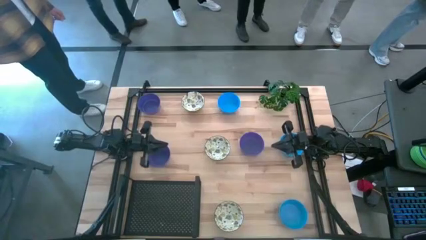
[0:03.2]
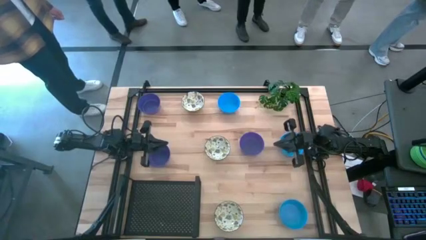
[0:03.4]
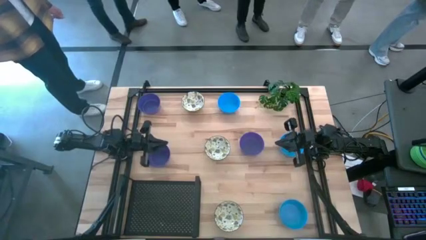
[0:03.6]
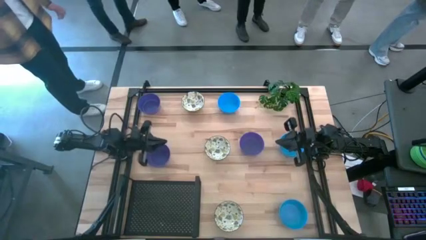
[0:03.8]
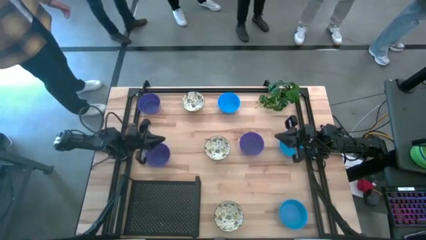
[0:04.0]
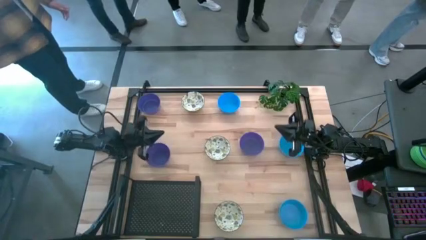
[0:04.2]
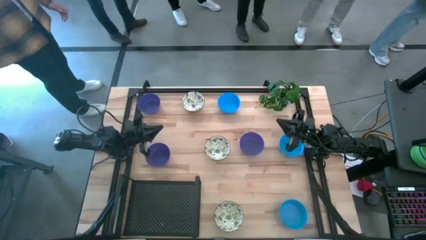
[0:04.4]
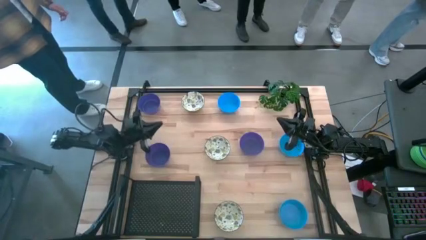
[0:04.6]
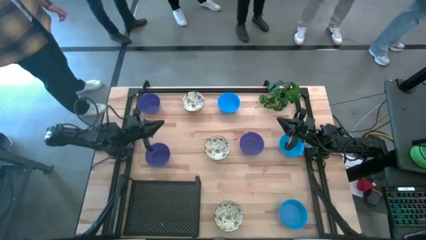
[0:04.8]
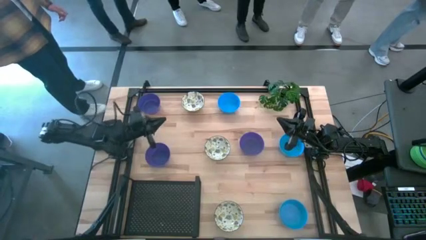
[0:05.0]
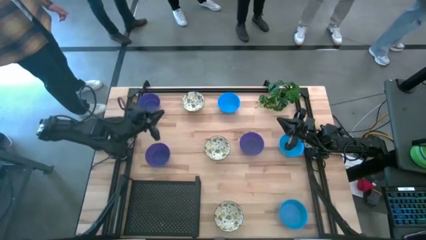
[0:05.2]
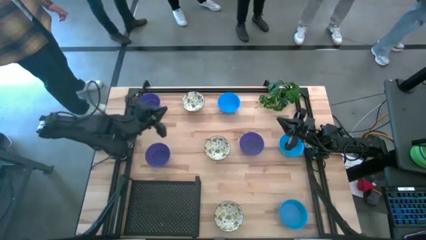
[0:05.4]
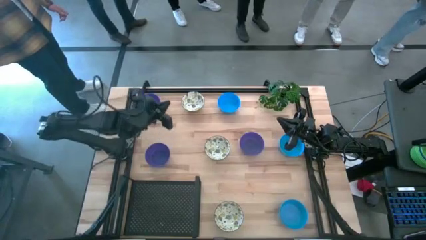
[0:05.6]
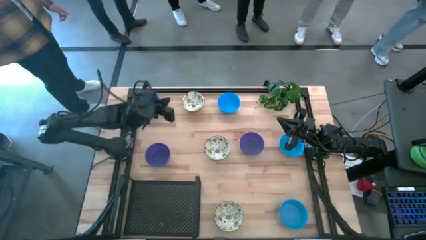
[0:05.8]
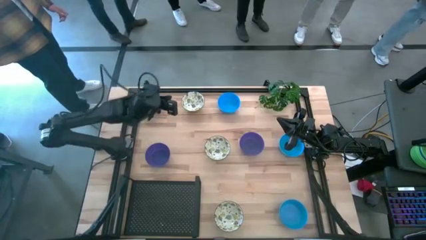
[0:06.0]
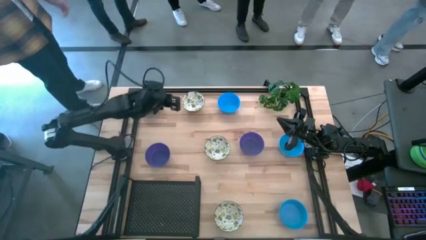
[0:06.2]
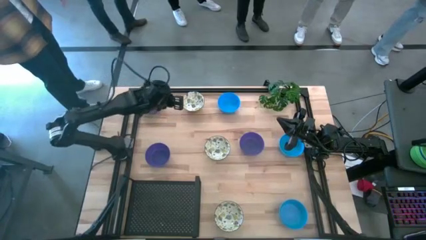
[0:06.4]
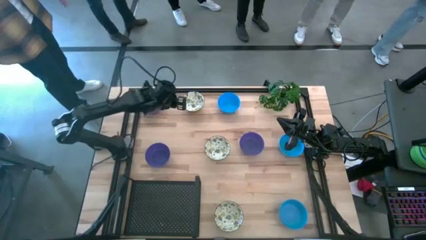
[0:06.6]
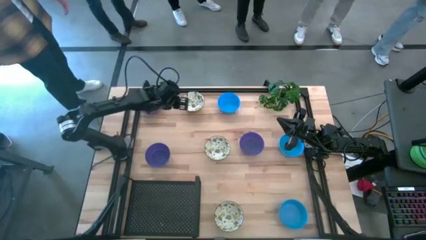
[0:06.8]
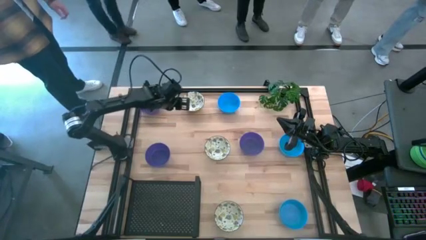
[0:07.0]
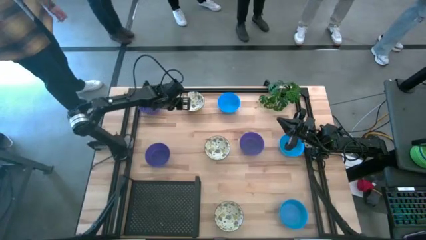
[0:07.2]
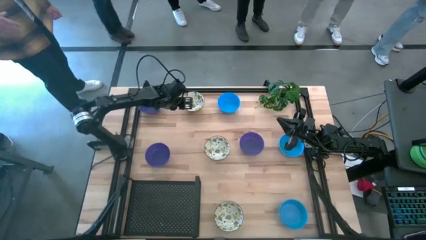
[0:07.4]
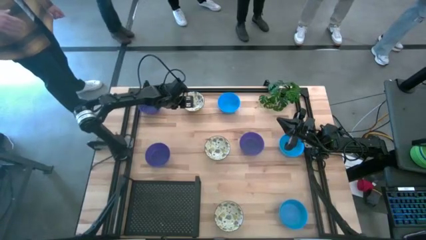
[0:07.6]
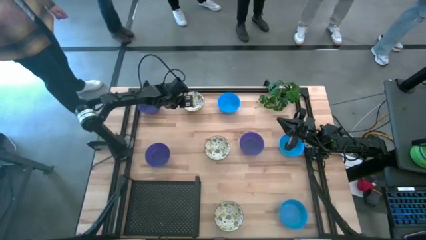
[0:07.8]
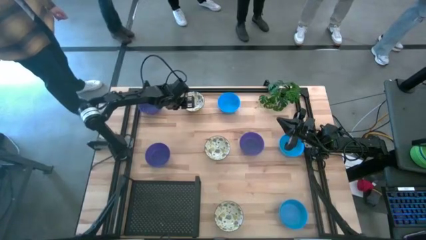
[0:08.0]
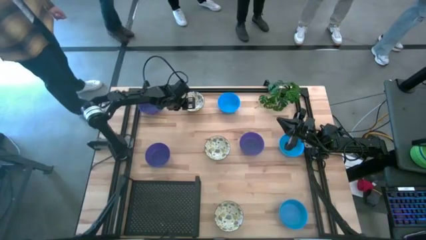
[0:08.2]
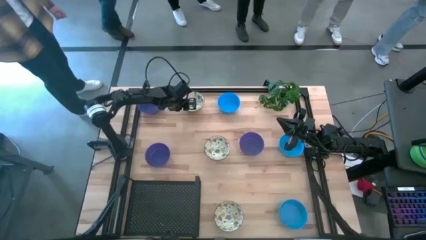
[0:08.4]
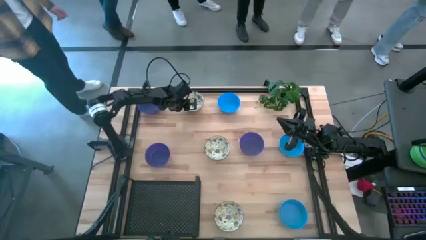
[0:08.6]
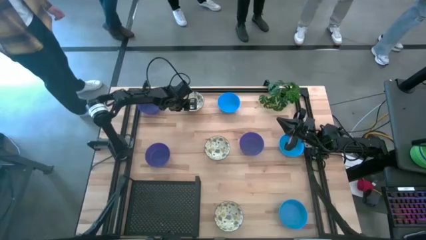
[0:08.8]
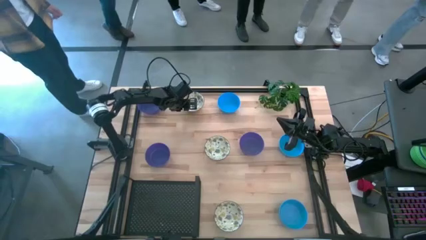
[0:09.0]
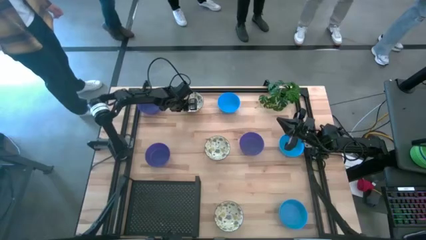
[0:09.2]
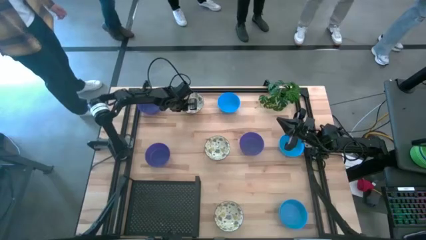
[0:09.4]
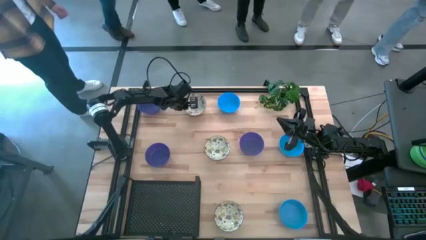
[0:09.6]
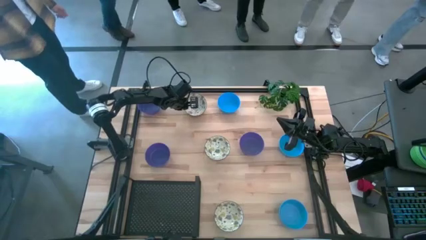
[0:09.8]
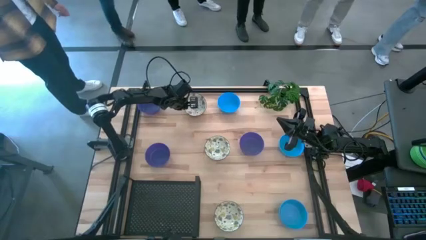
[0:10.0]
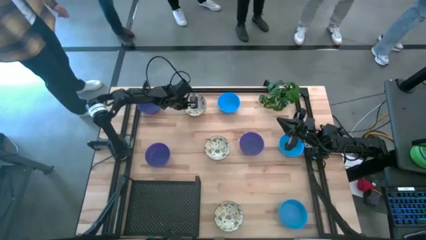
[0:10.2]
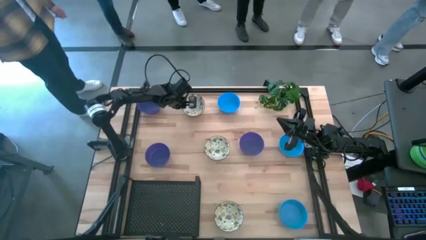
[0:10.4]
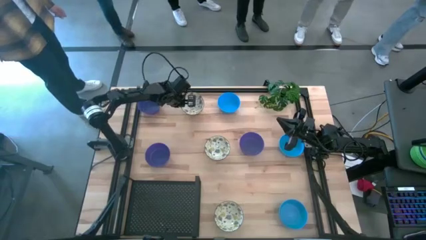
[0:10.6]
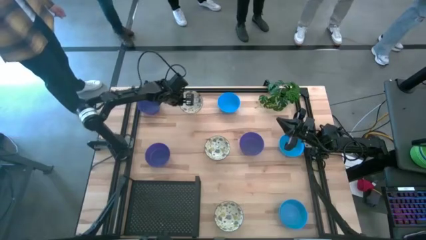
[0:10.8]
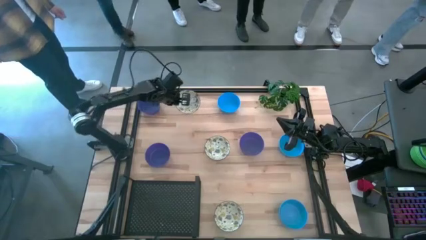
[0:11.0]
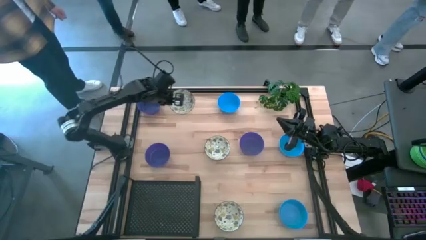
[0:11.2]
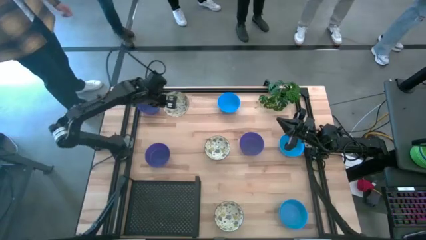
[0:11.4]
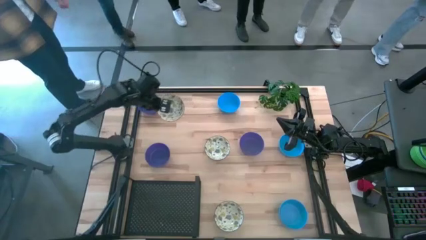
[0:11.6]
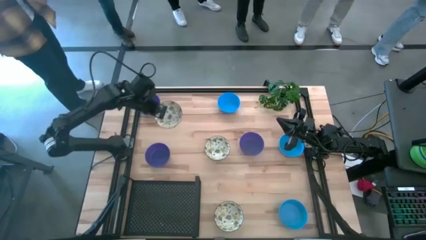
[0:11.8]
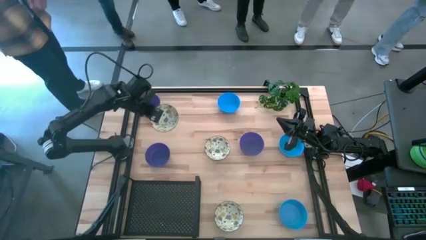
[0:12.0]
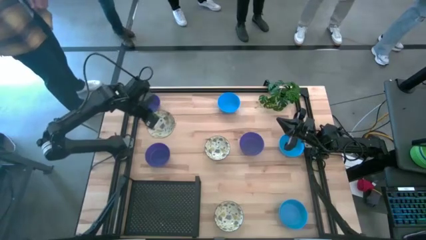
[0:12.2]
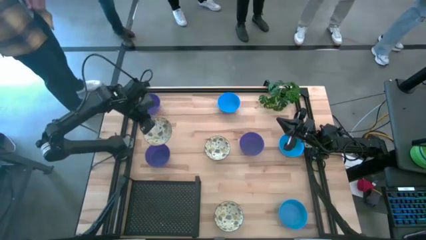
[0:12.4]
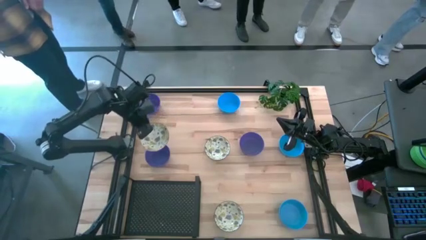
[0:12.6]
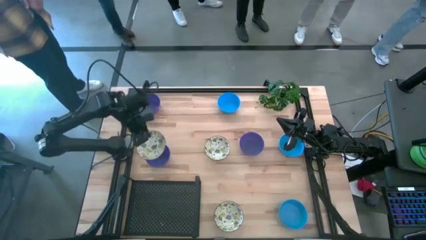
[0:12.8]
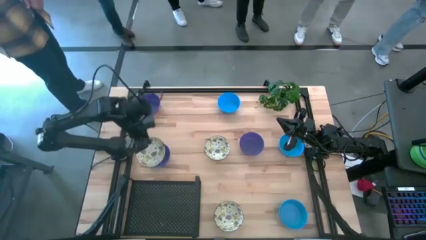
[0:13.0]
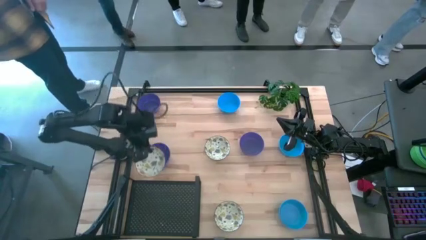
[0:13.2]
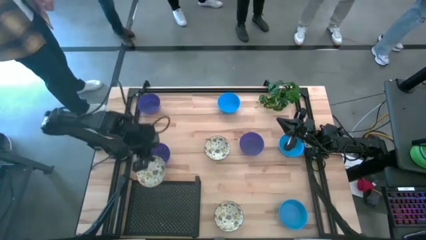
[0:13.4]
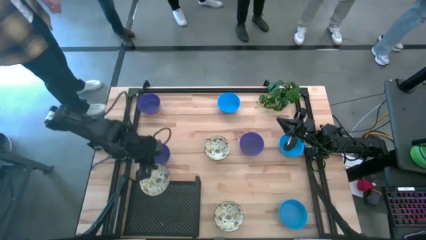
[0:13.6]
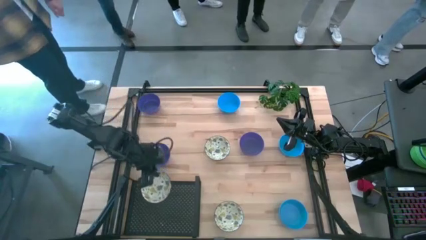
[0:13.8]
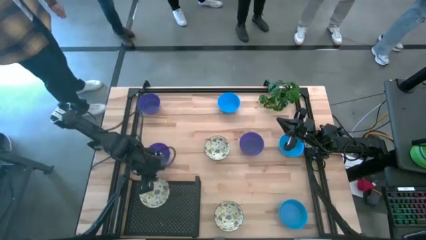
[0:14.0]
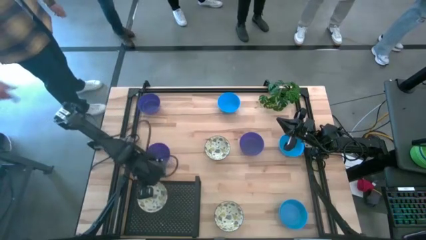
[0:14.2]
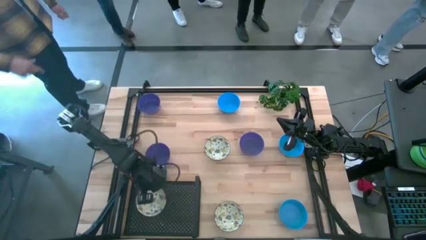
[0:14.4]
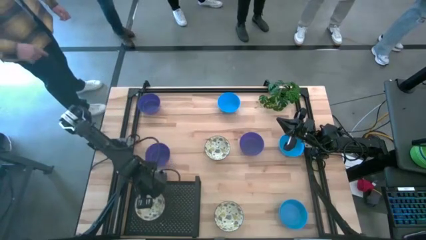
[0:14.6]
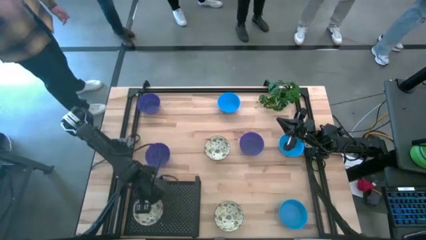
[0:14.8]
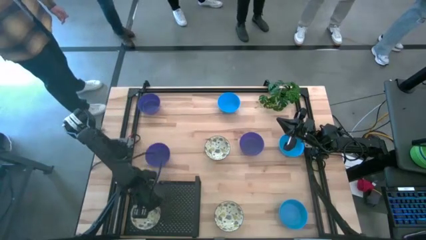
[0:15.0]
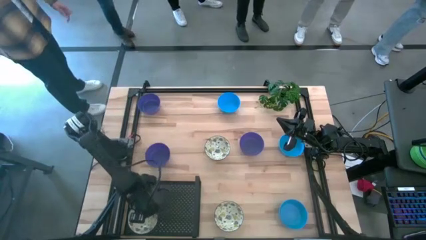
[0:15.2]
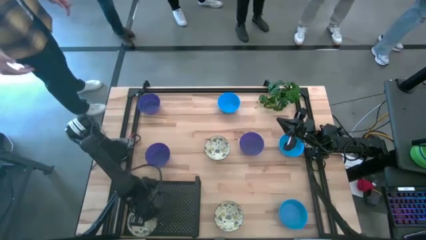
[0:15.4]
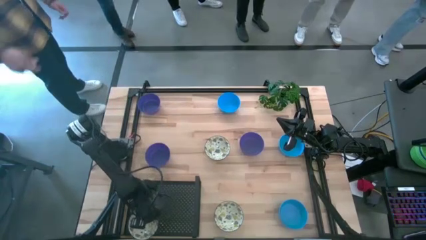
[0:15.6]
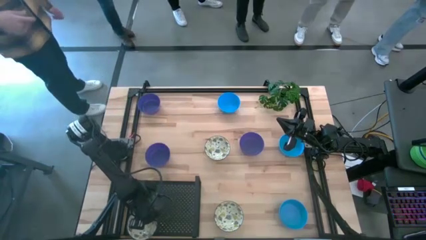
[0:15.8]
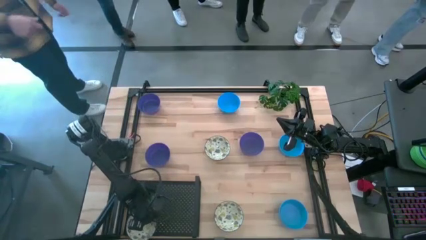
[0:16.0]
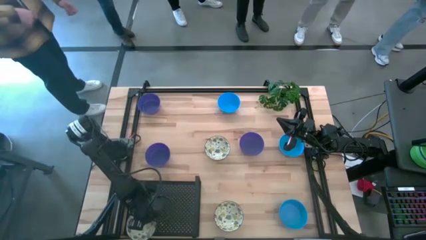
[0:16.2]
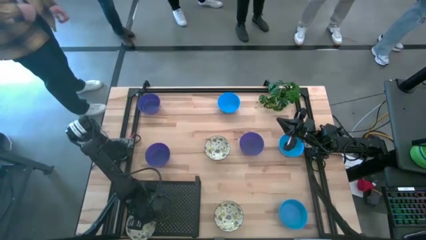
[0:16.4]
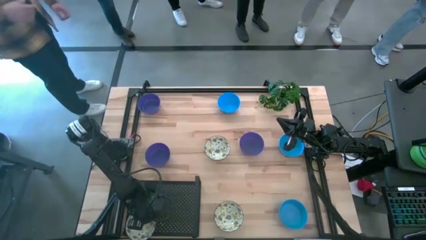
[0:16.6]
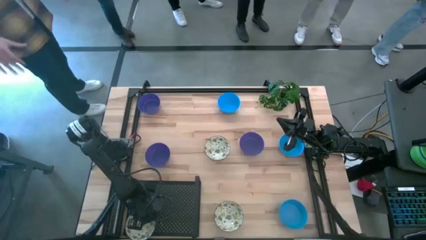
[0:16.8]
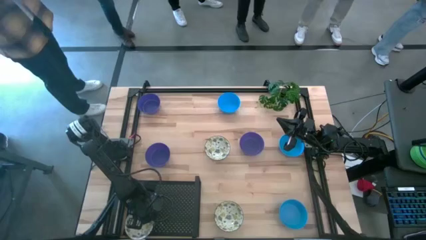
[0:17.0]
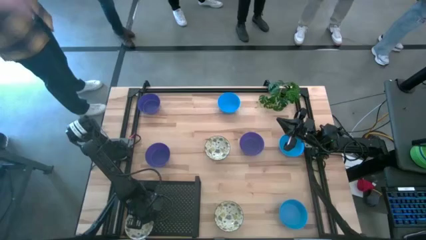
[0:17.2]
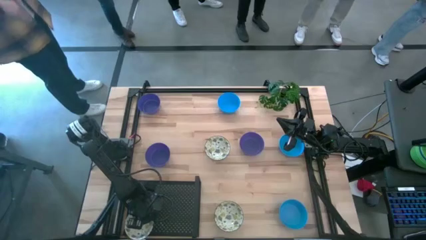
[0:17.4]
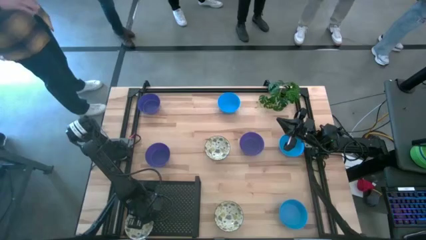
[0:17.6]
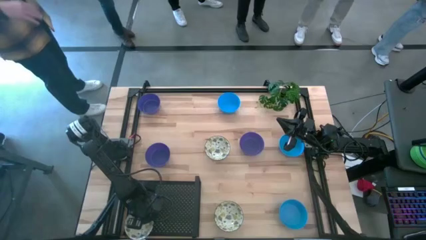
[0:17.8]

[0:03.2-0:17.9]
Task: Pick & Place Mini bowls
Put the top yellow patterned bowl on the shelf
